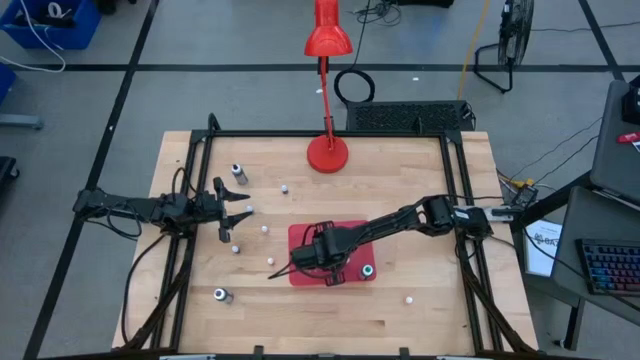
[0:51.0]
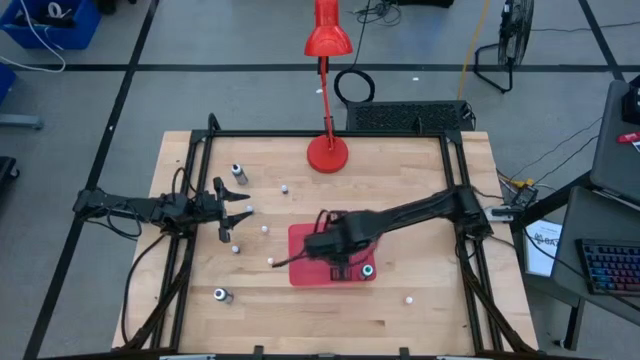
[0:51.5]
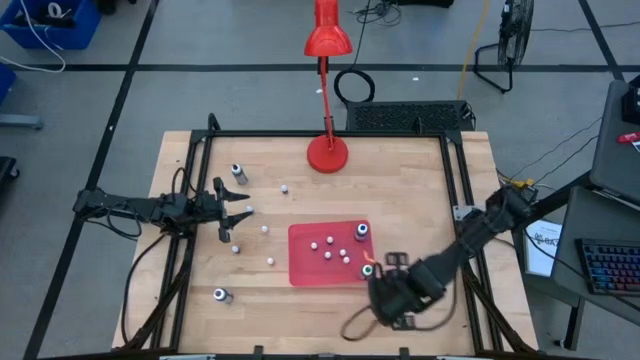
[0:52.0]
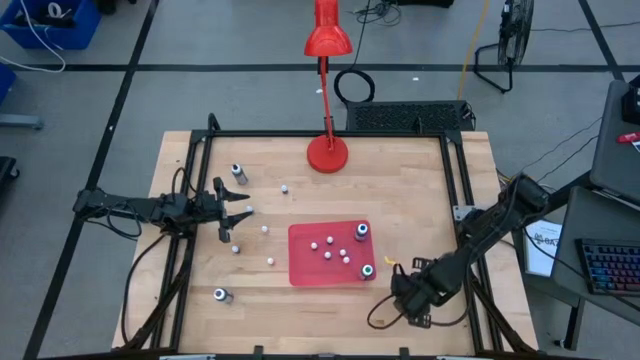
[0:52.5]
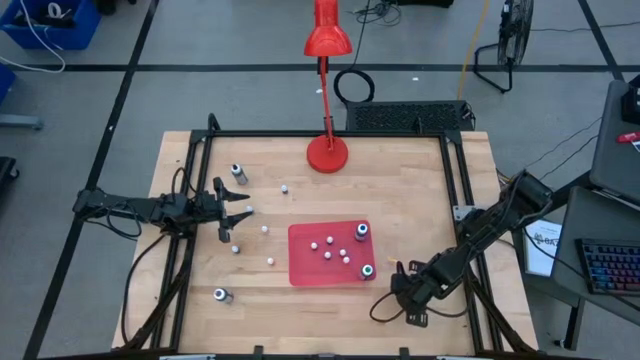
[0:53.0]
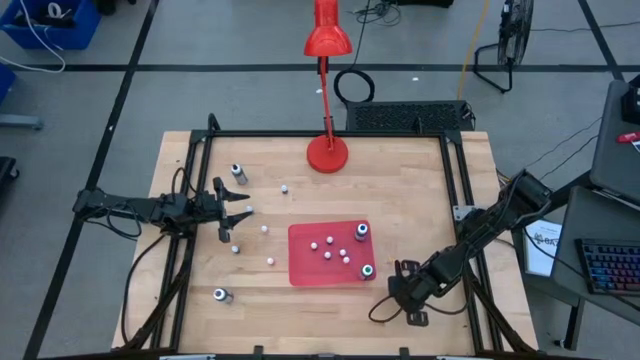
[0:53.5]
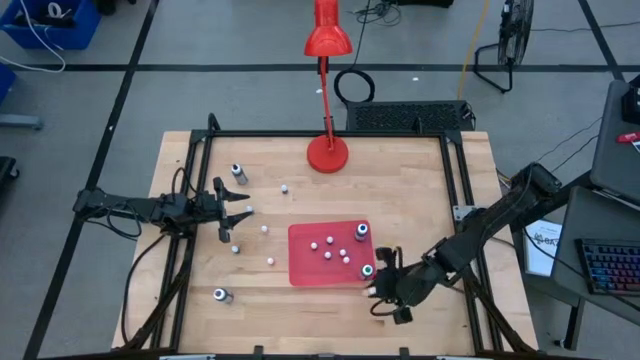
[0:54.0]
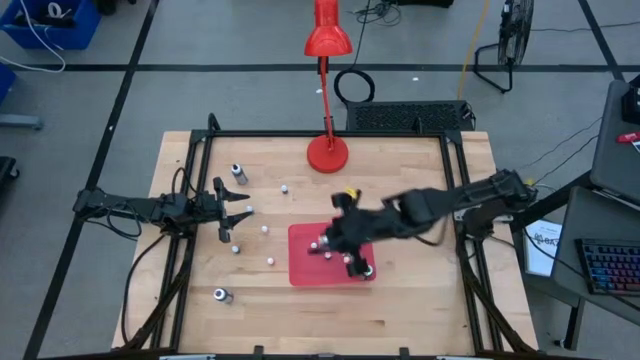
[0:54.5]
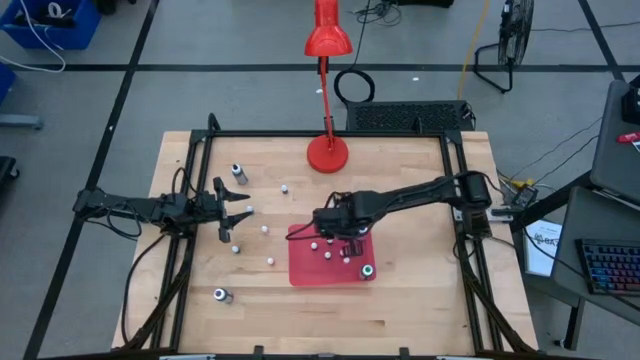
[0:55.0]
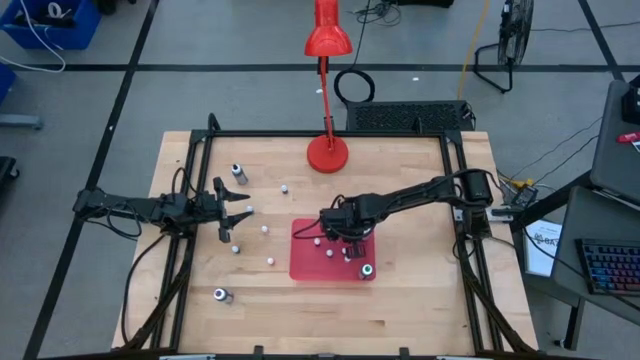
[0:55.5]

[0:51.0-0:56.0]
Task: Pick & Place food coloring
Put the small orange food coloring bottle into the pink bin

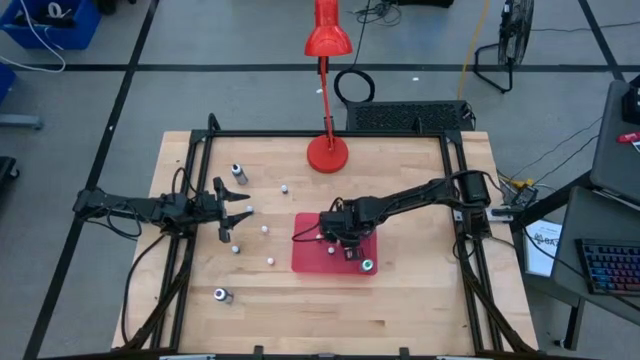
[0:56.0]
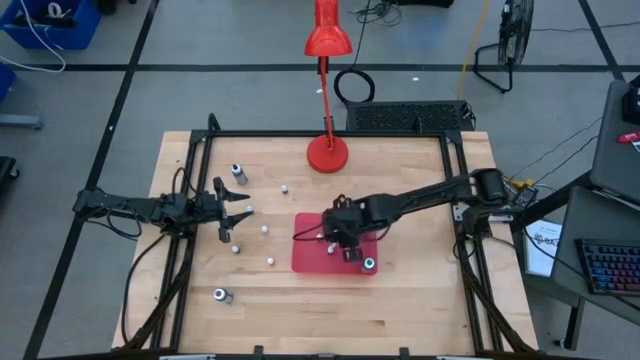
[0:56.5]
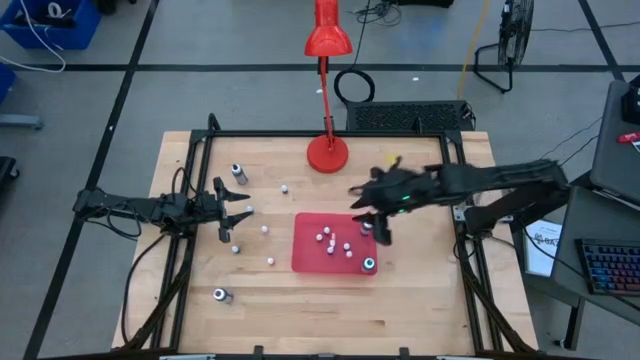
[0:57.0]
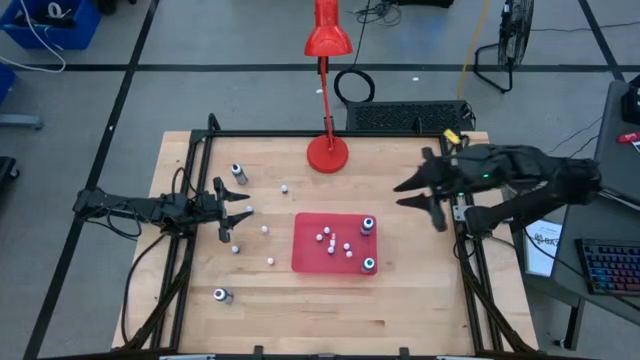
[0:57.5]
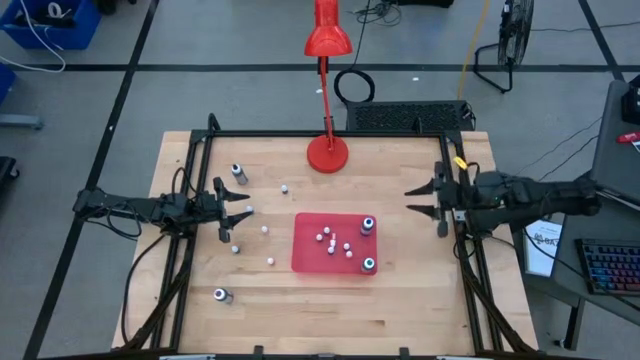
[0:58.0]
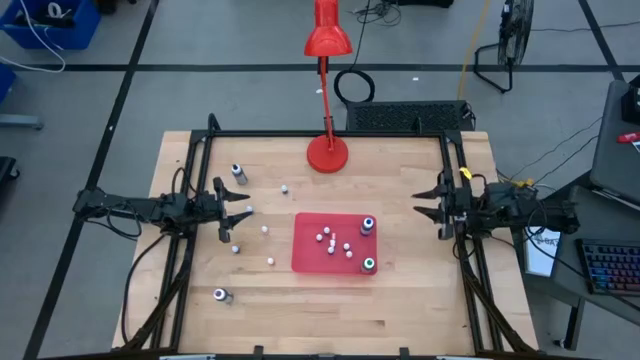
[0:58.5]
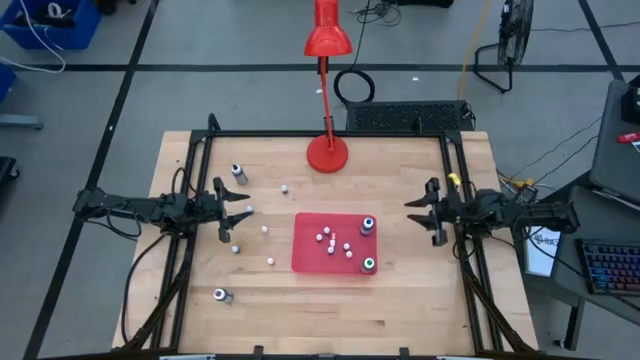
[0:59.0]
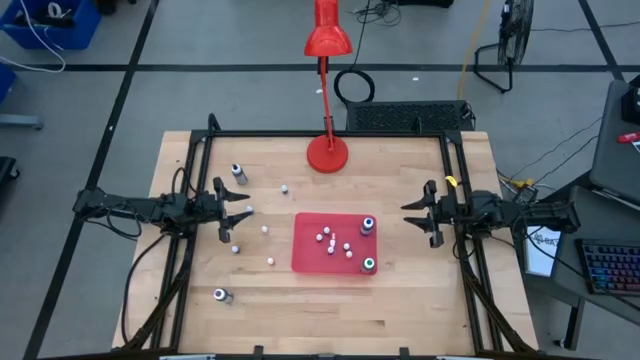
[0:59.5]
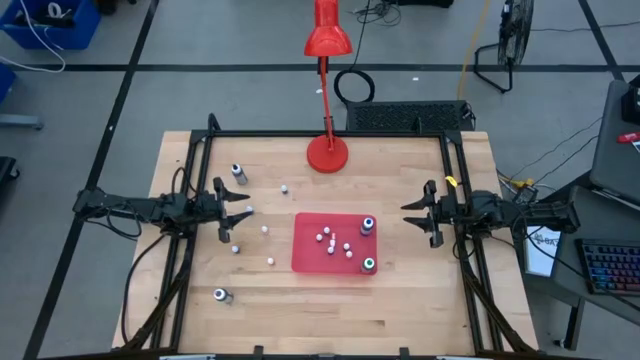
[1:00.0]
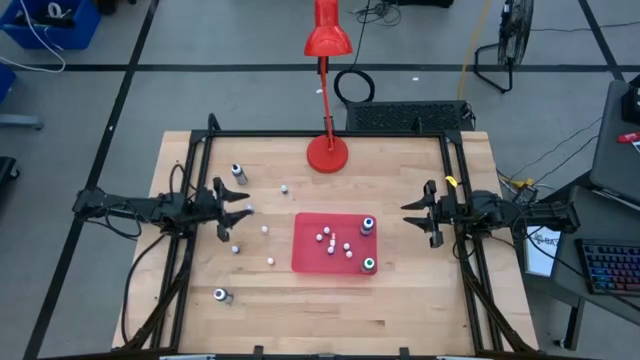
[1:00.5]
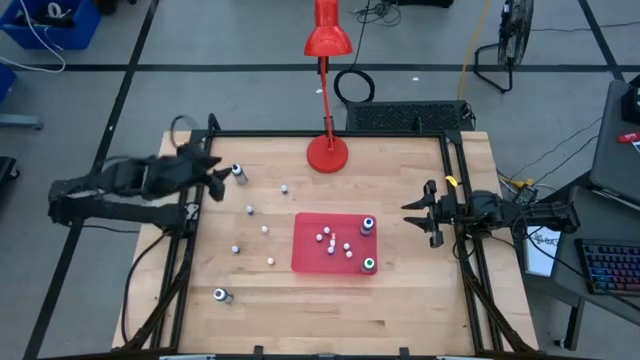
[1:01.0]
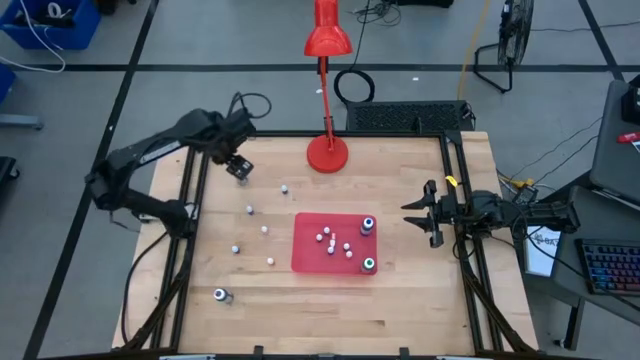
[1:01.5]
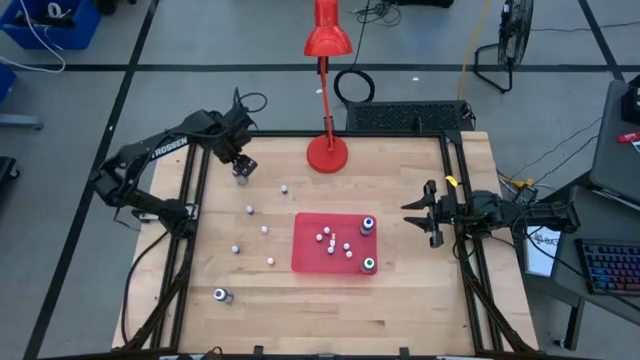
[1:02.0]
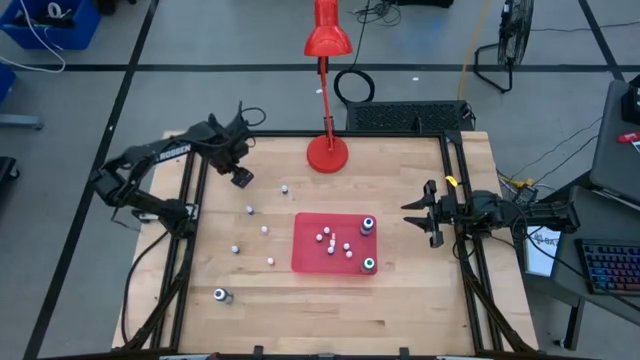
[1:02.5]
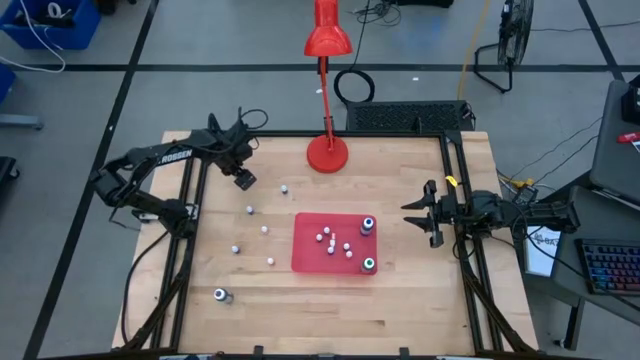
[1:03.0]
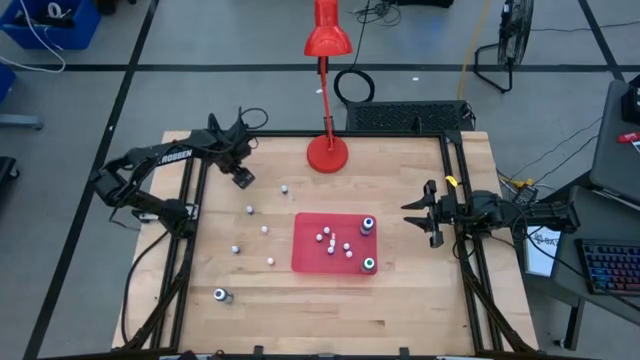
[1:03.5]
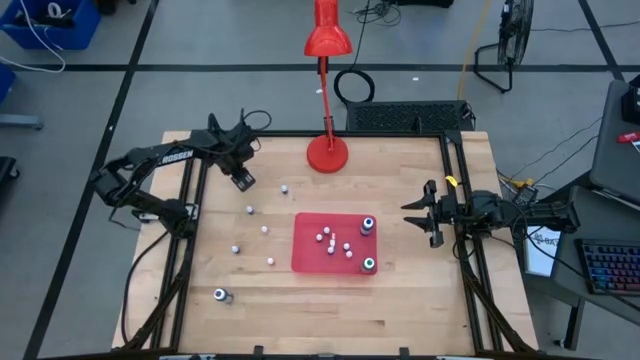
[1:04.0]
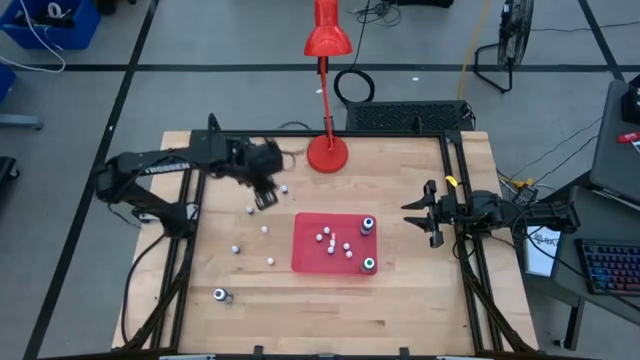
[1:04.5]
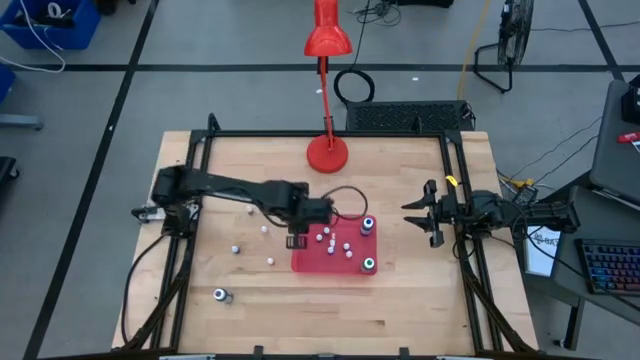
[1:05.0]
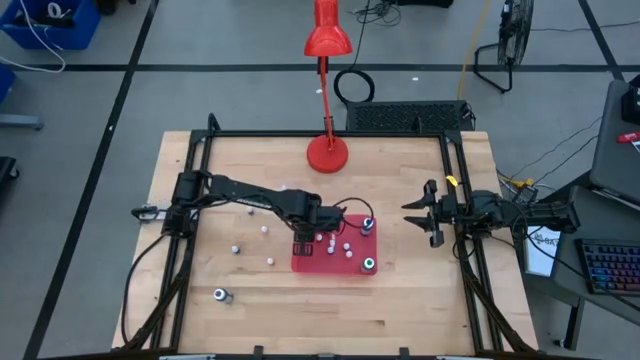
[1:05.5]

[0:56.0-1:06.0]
Put the large black food coloring bottle into the pink bin

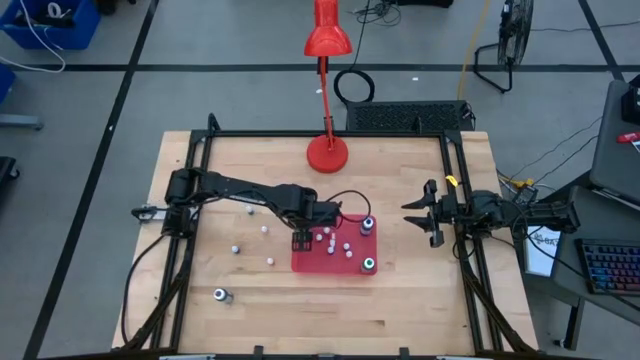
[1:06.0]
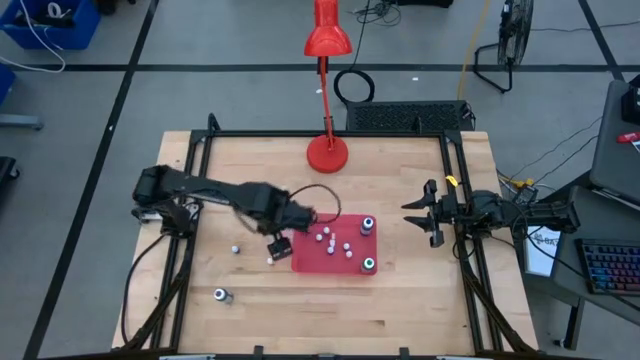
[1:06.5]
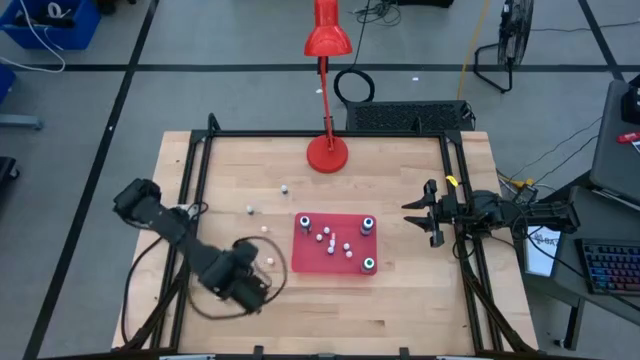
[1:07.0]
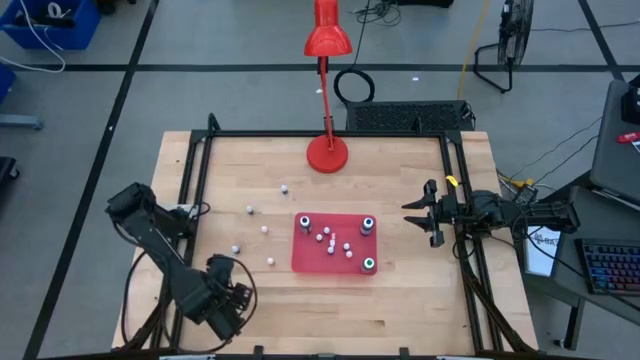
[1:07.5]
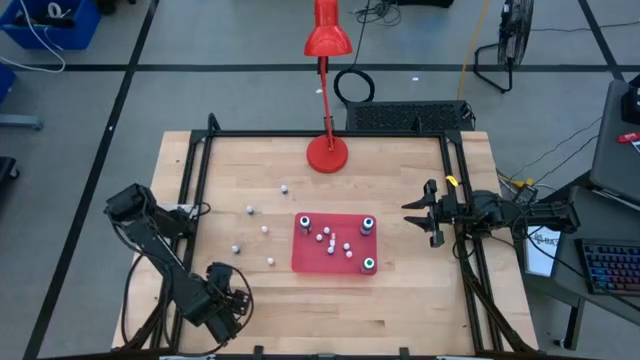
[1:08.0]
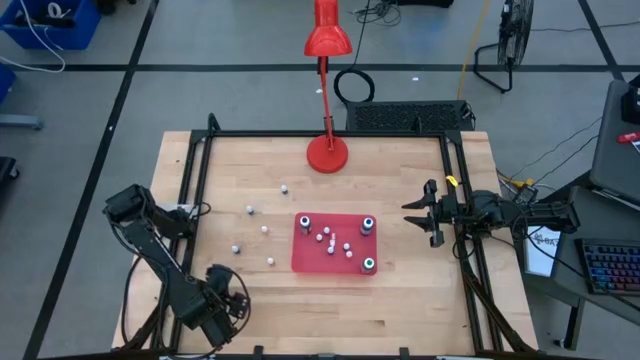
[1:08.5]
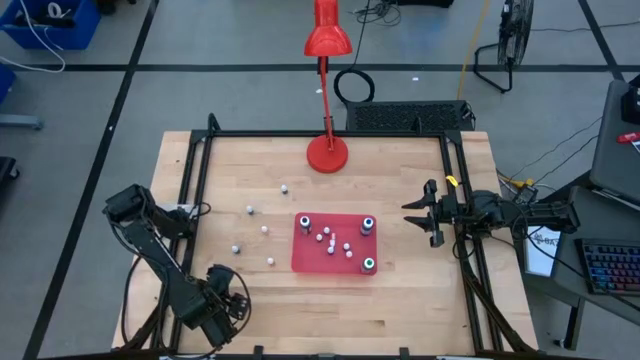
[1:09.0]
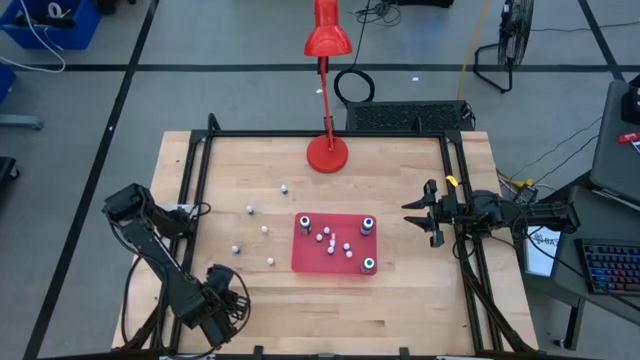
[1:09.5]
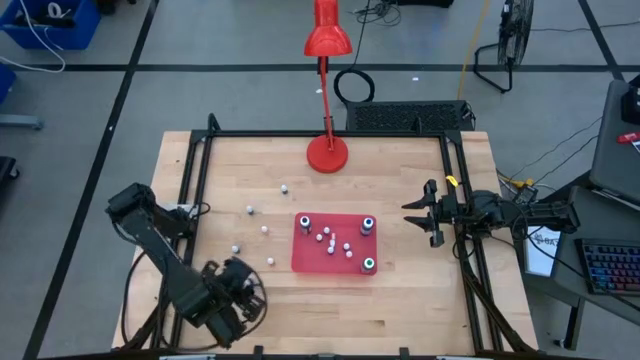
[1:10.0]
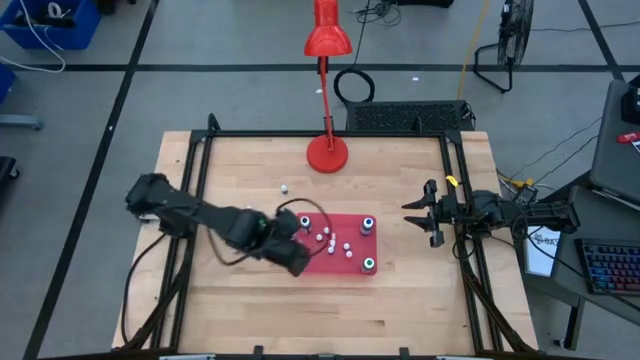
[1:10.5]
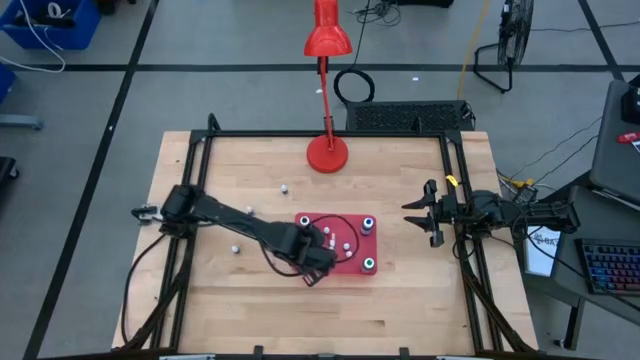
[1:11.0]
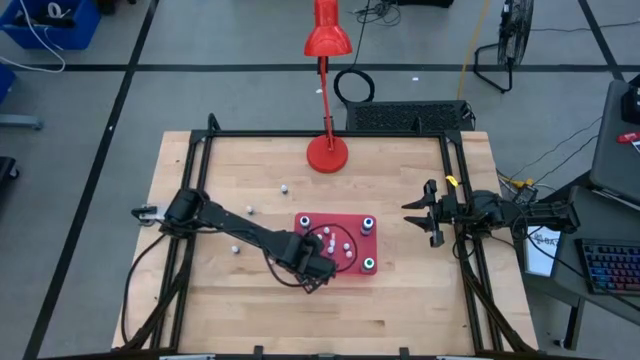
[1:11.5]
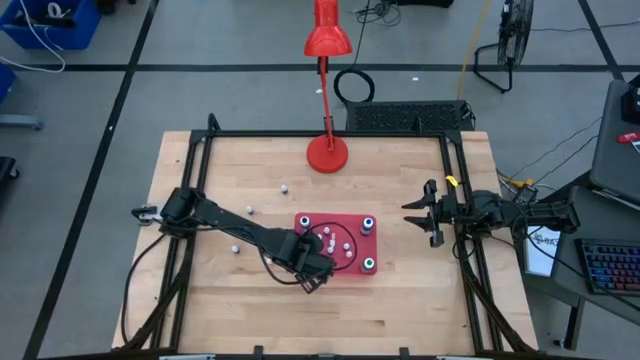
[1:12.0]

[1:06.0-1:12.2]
Put the large purple food coloring bottle into the pink bin
